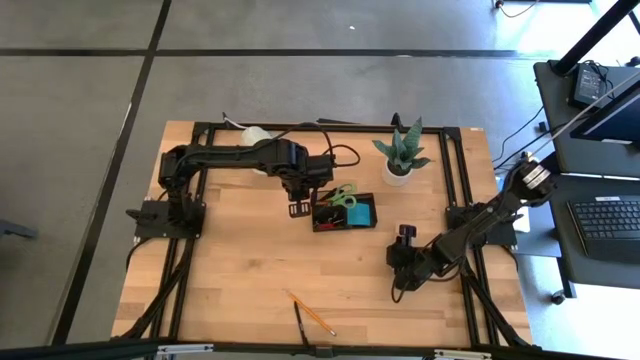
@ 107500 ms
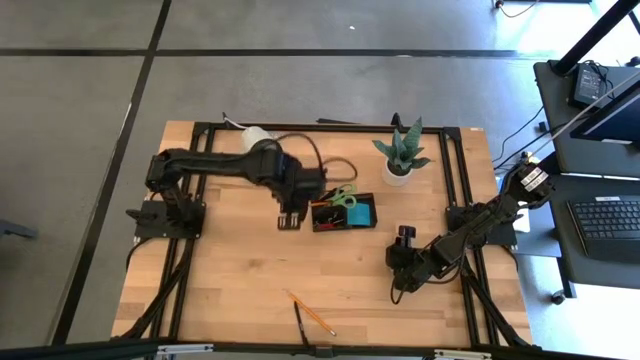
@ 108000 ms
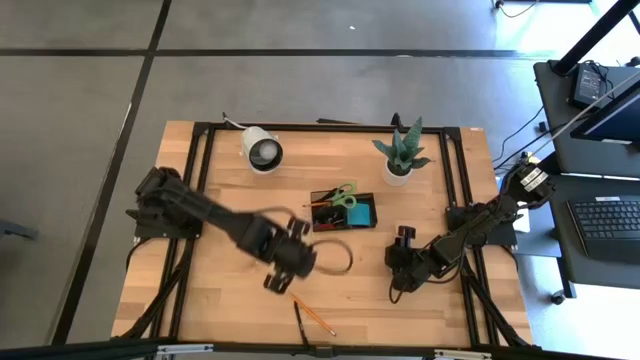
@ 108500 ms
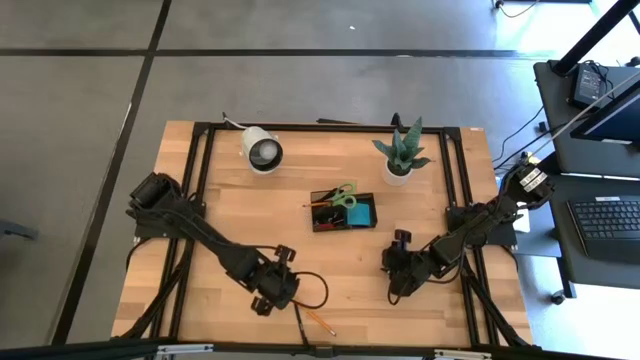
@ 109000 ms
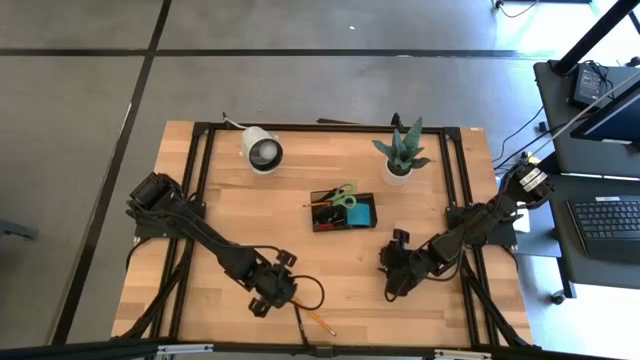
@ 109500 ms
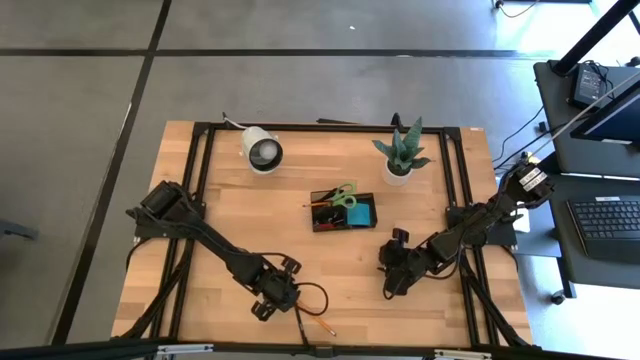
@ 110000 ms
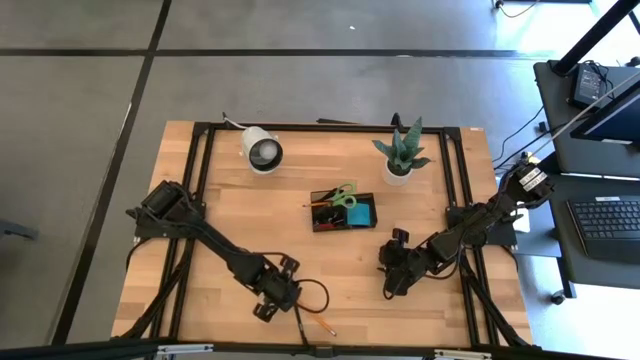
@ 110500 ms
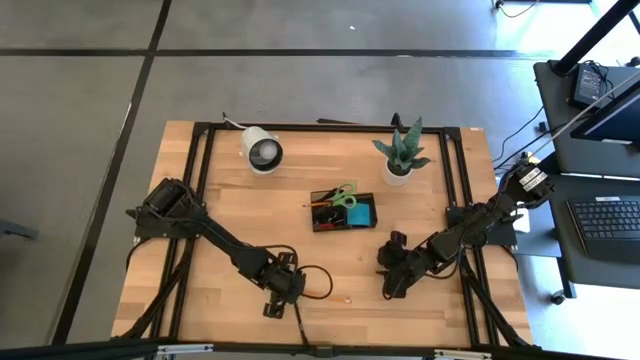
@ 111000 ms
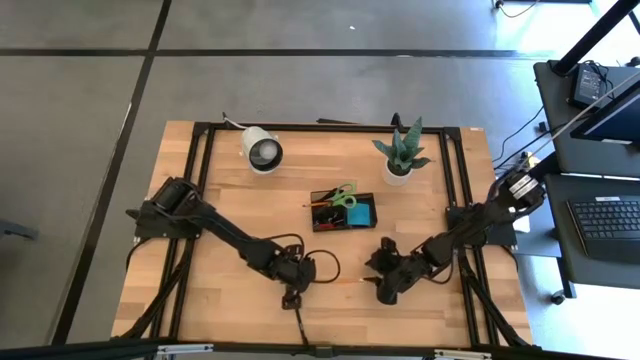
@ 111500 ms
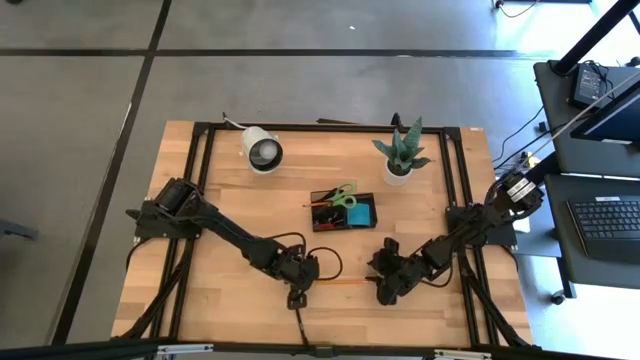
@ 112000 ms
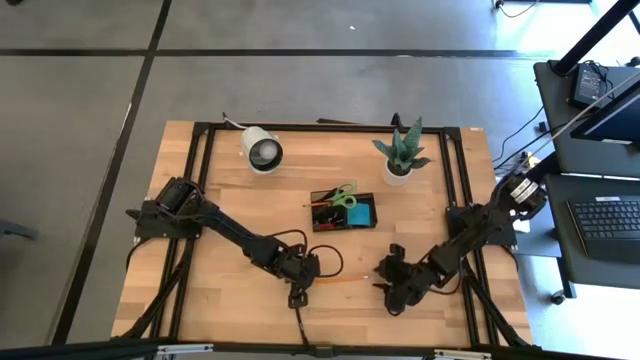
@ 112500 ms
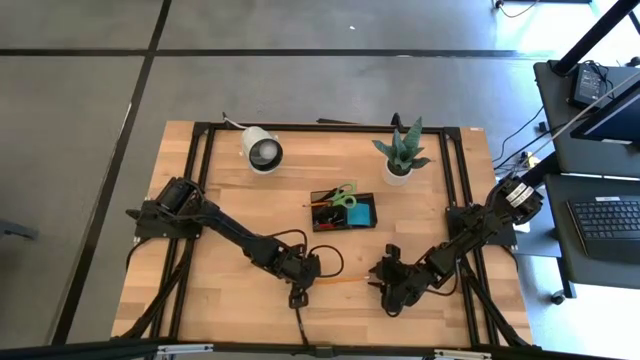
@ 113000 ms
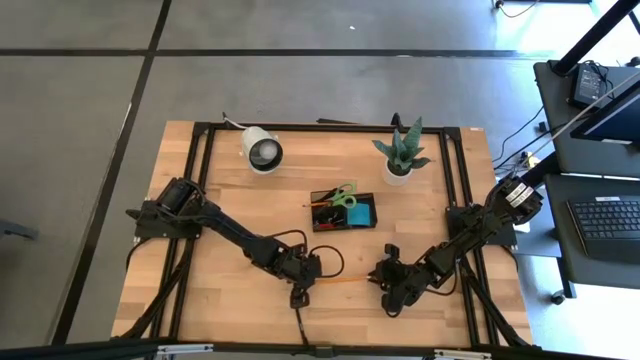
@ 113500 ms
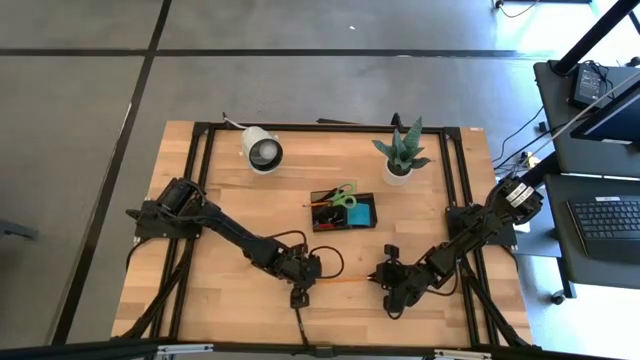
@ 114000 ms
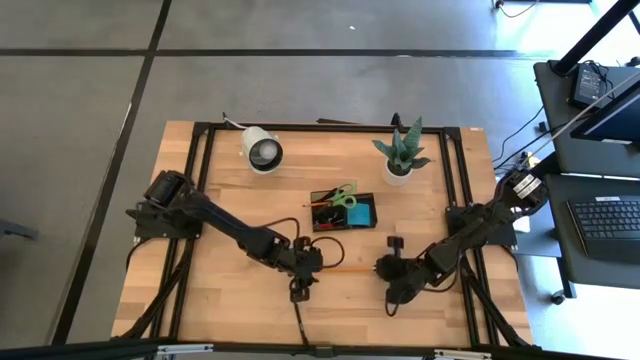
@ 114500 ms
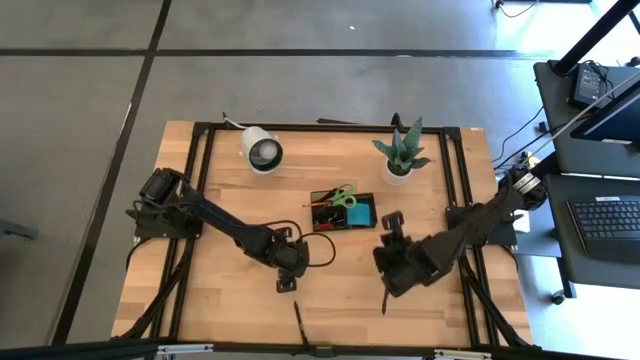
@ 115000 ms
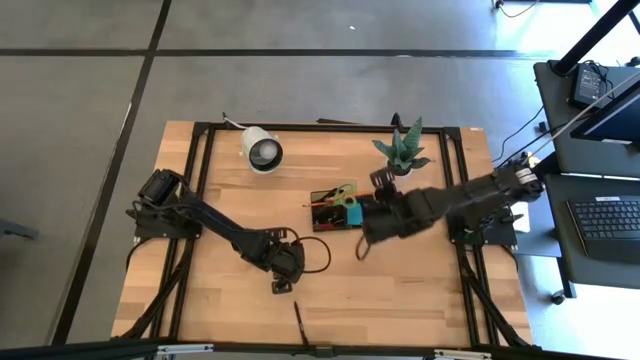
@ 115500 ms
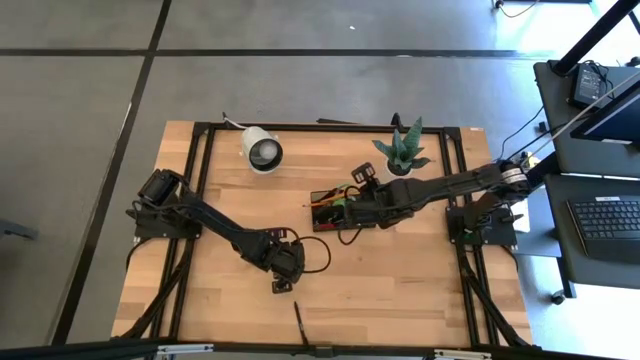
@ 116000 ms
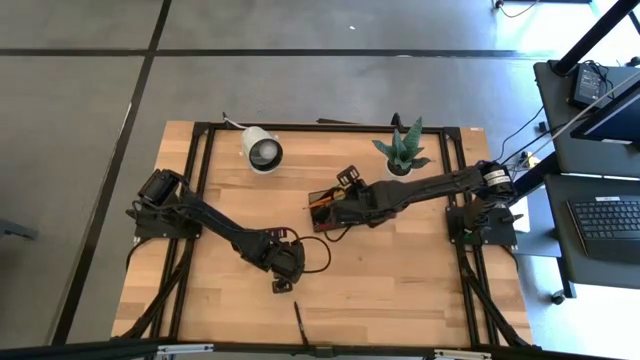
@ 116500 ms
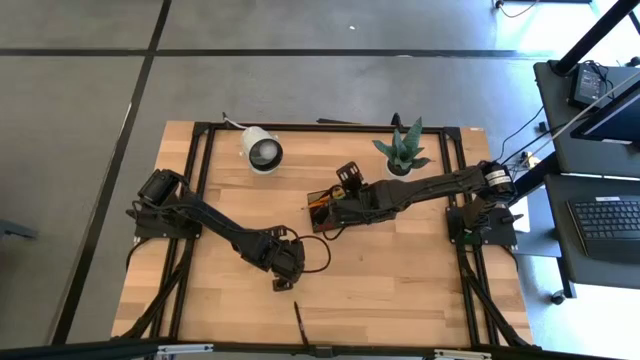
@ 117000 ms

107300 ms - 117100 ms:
Task: Pick and place office supplies into organizer
Put the orange pencil in the desk organizer

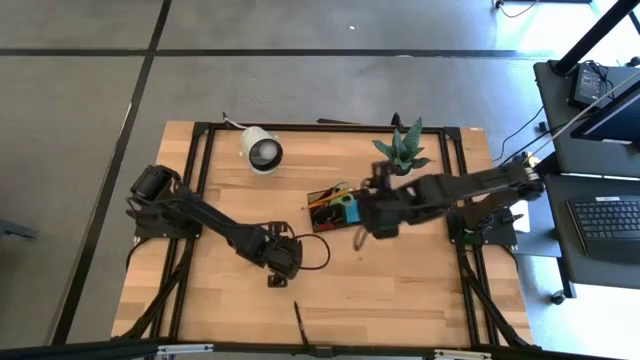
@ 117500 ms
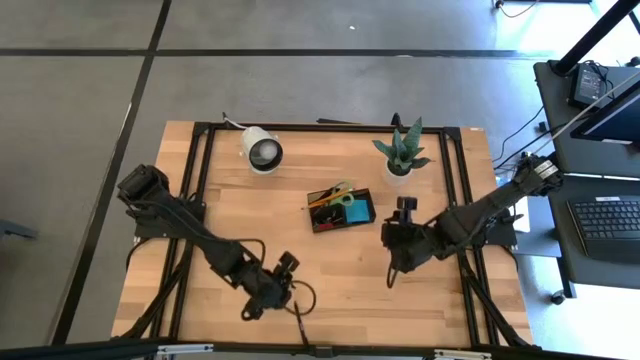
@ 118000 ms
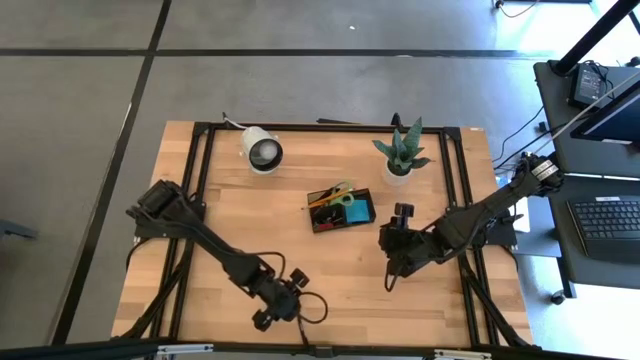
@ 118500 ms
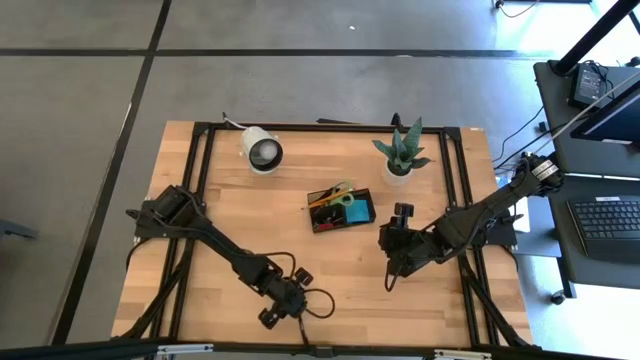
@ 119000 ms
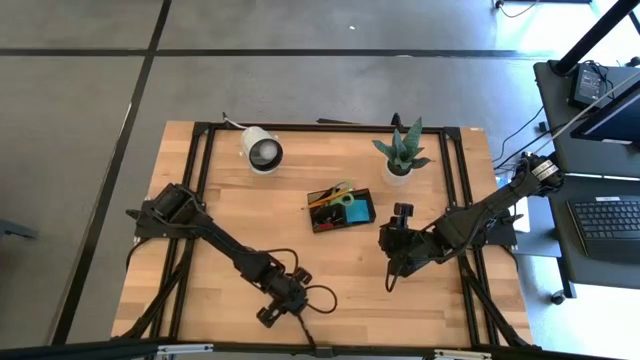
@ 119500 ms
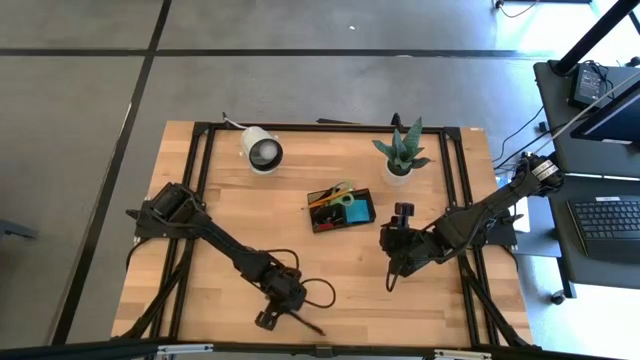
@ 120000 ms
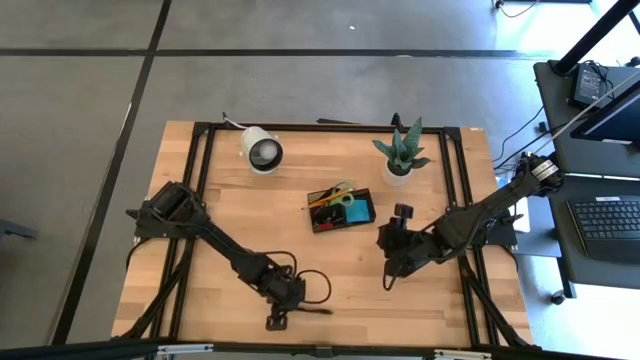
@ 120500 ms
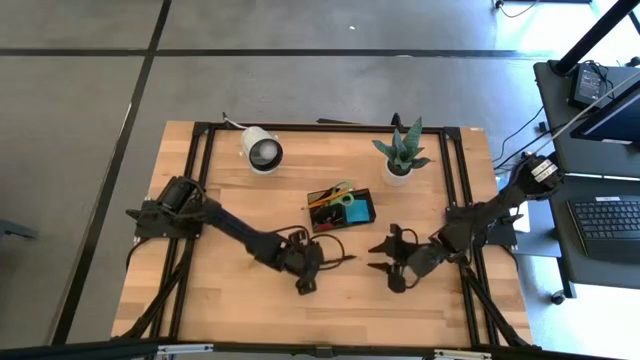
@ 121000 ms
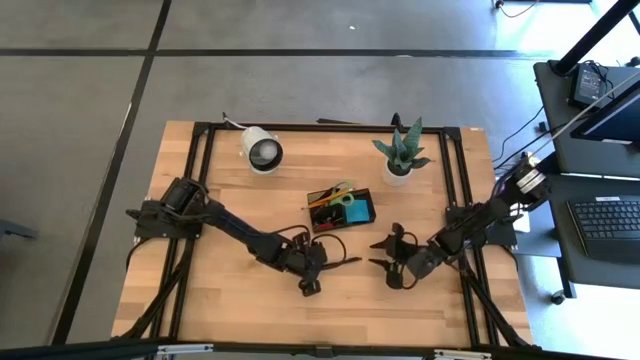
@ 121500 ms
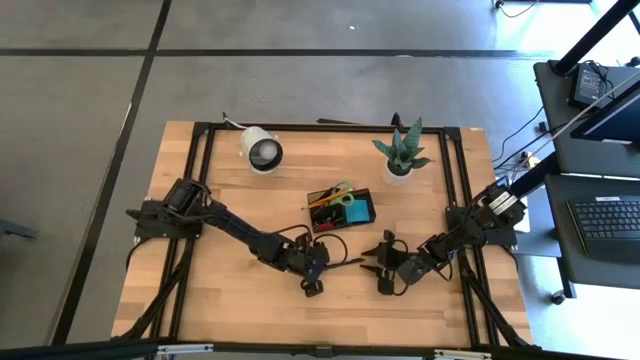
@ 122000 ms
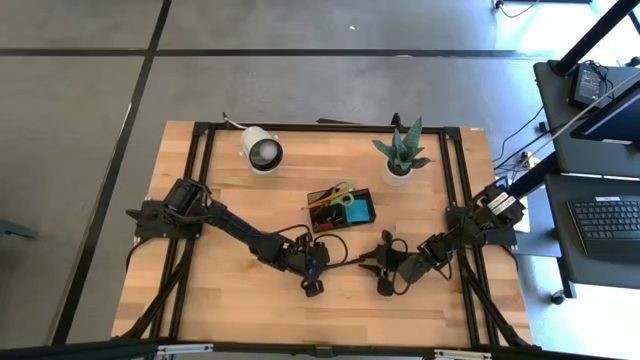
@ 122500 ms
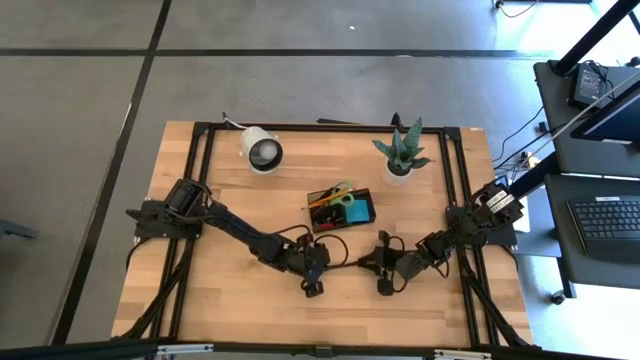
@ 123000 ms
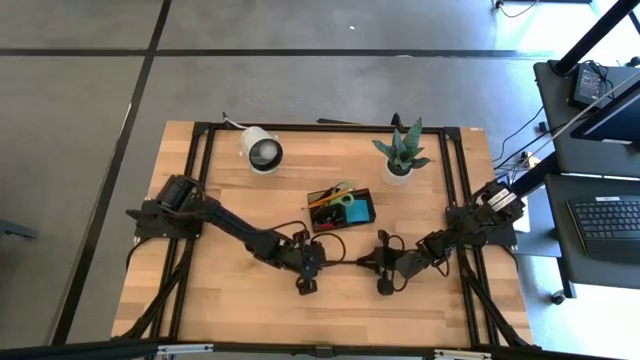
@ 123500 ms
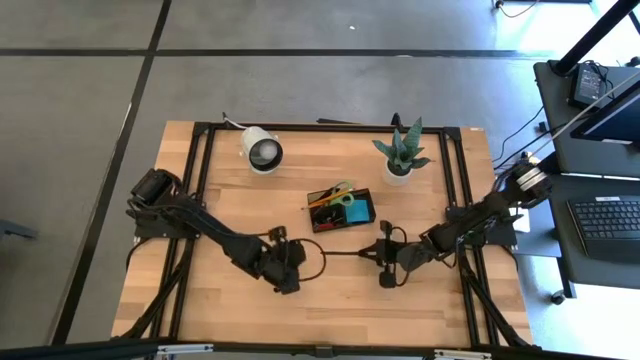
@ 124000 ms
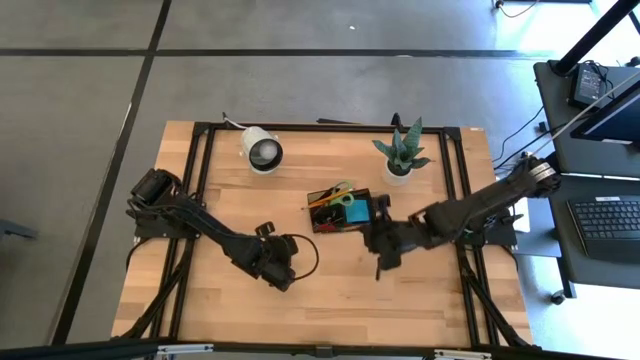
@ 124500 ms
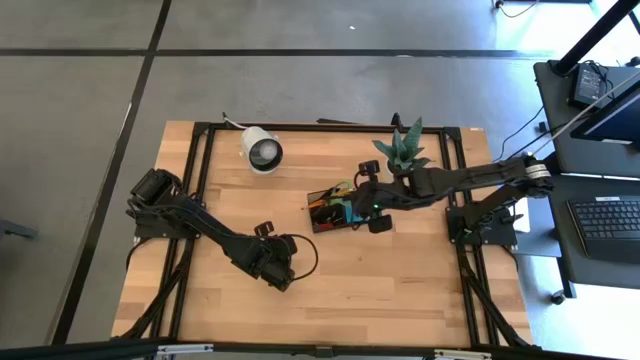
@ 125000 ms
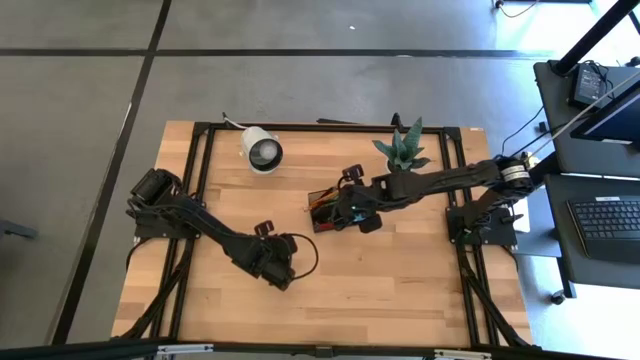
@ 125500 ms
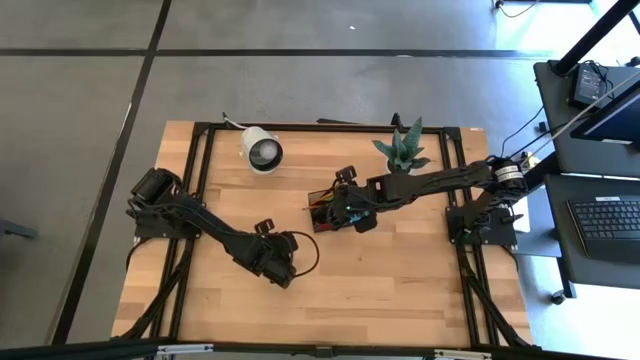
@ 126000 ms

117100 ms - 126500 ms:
Put the black pen in the desk organizer

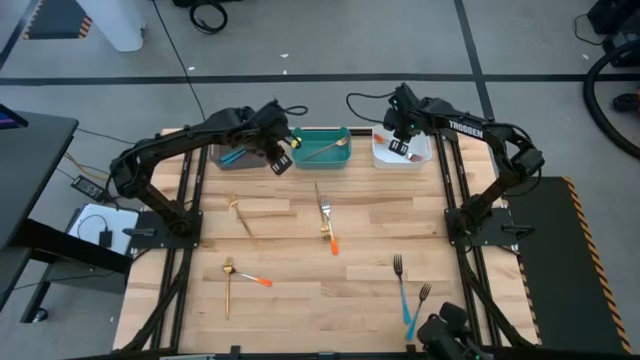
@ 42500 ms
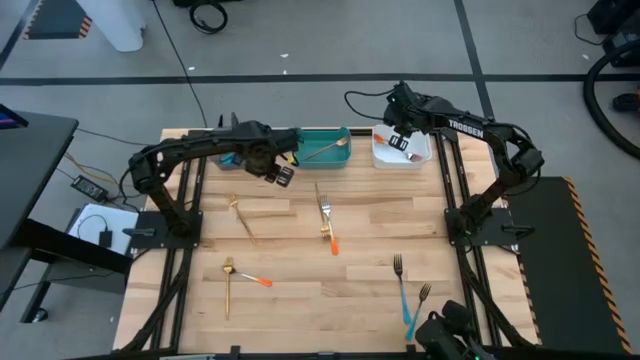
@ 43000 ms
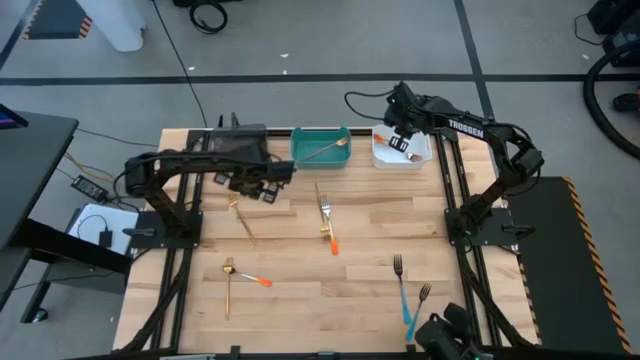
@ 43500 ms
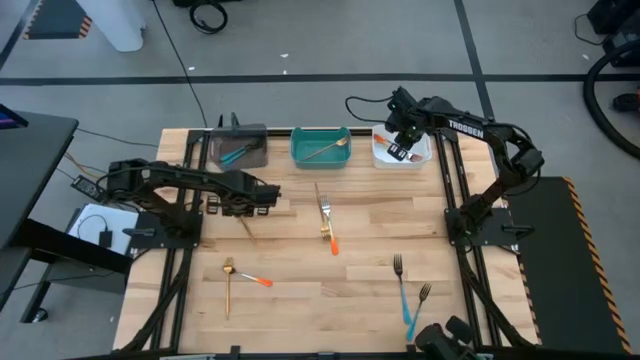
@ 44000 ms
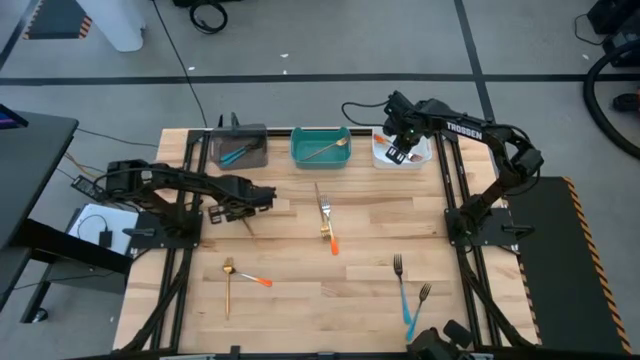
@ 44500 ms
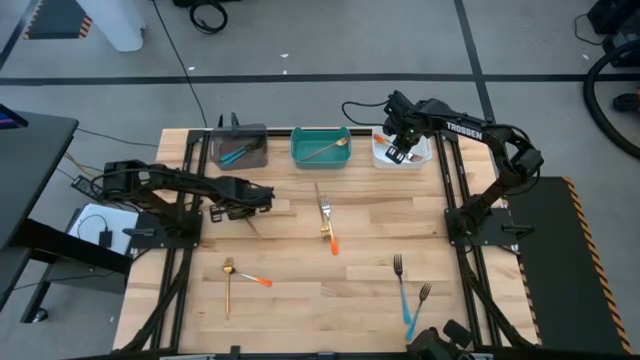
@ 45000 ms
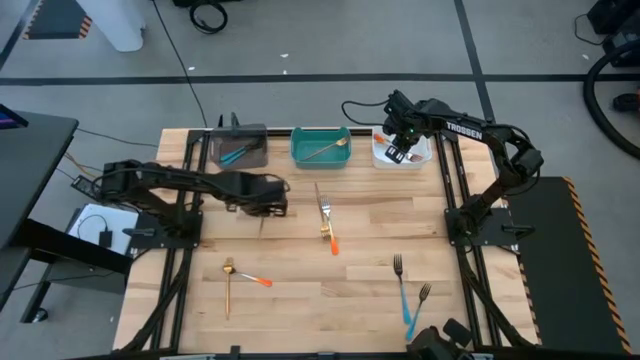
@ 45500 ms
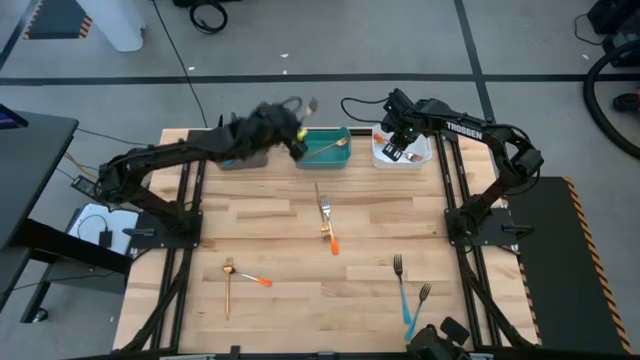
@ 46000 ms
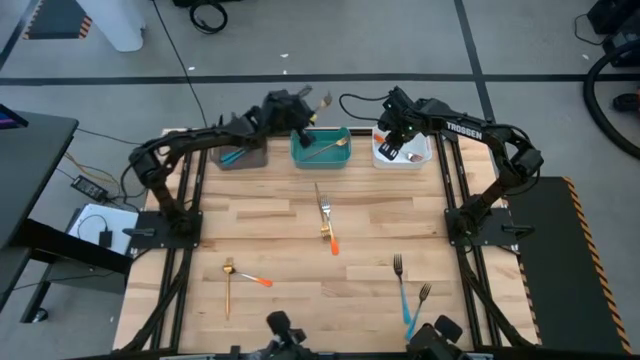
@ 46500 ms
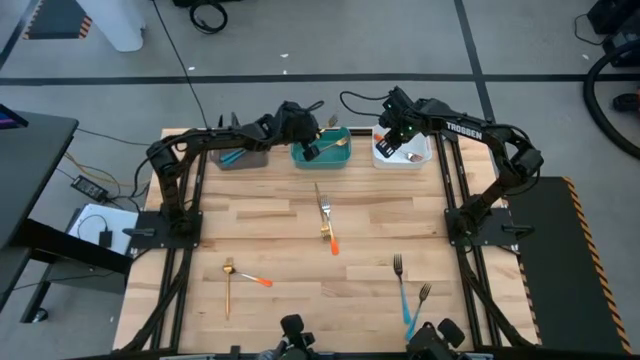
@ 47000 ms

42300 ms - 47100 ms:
Task: Sort silverware by color (type)
Put the gold fork into the green bin
